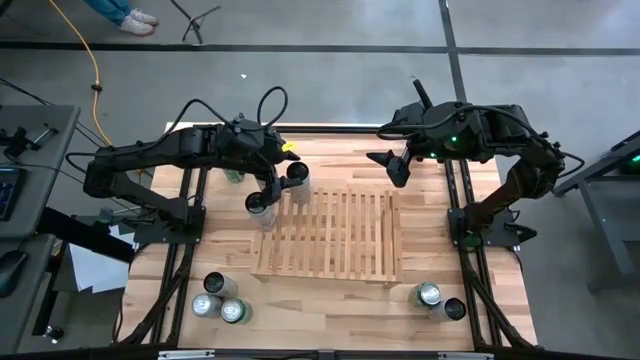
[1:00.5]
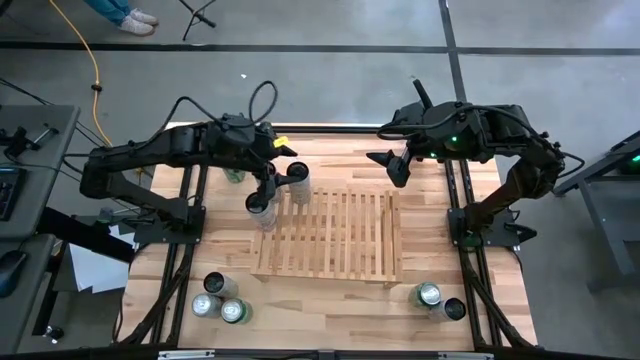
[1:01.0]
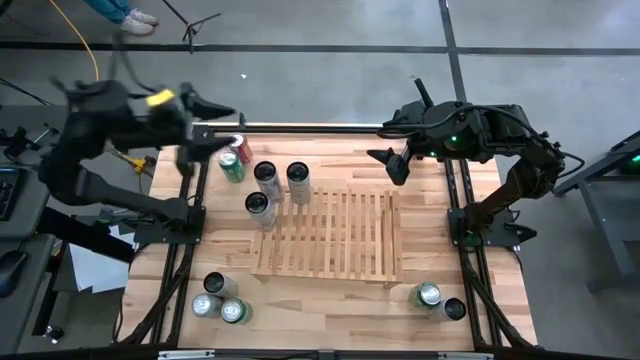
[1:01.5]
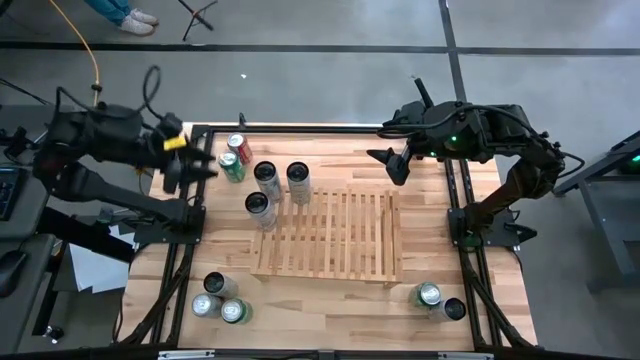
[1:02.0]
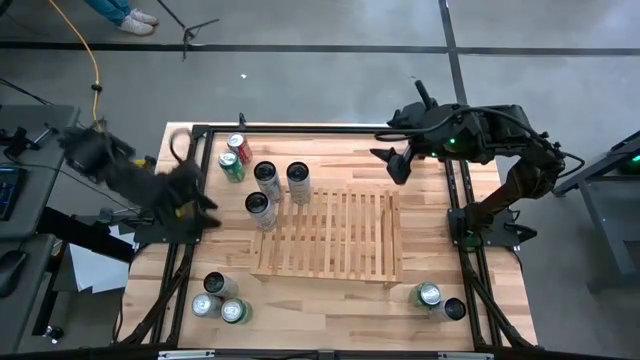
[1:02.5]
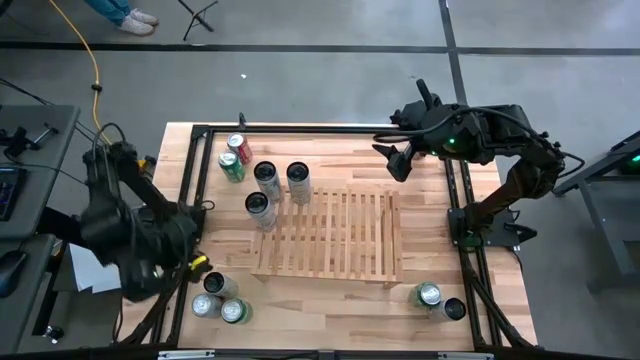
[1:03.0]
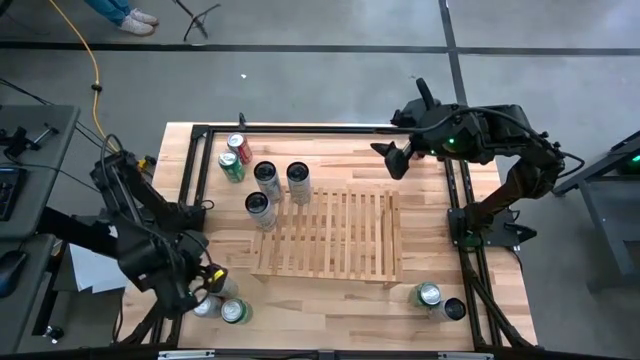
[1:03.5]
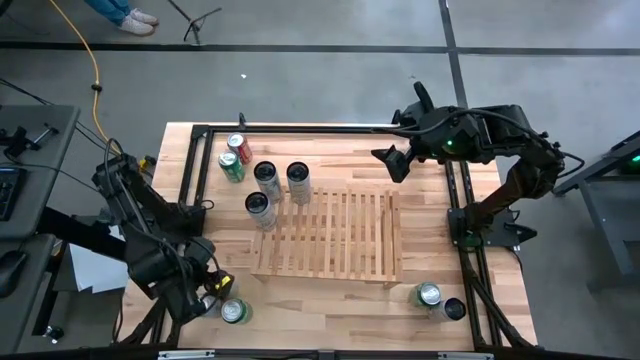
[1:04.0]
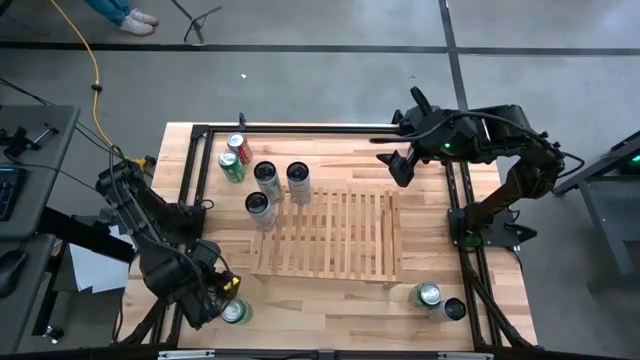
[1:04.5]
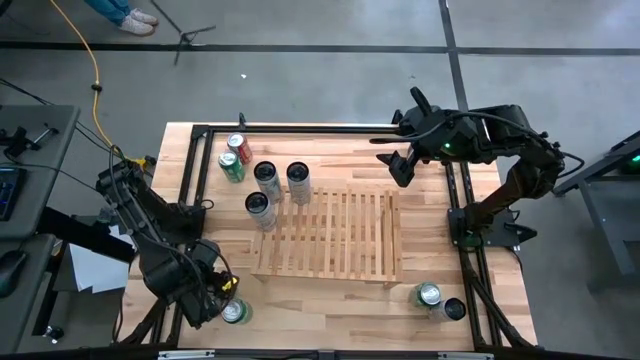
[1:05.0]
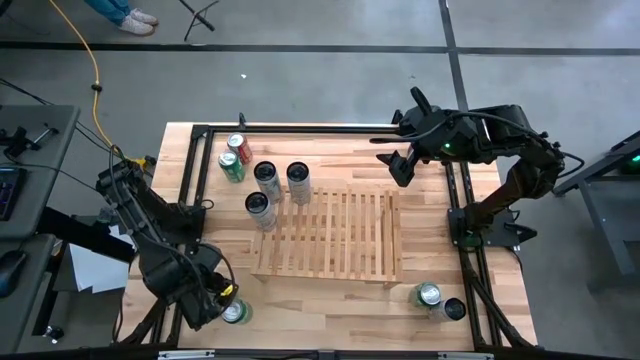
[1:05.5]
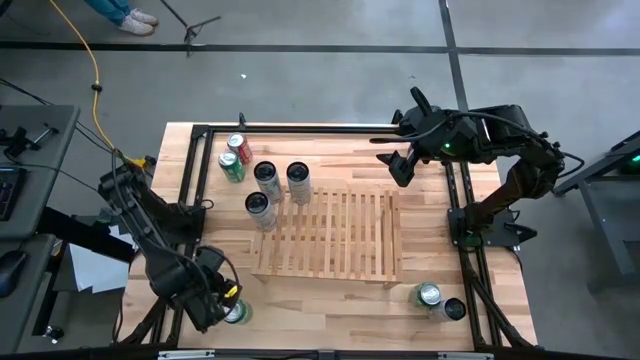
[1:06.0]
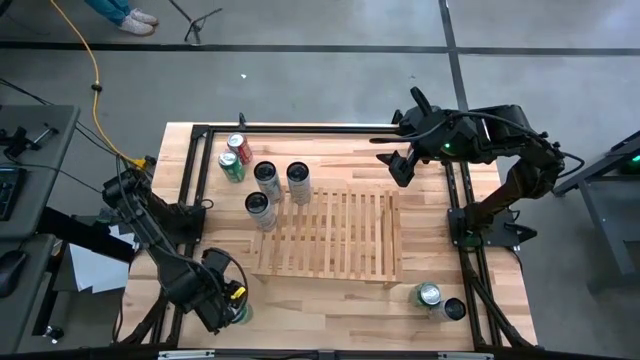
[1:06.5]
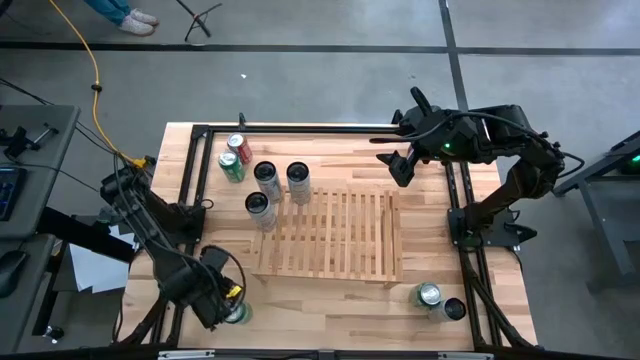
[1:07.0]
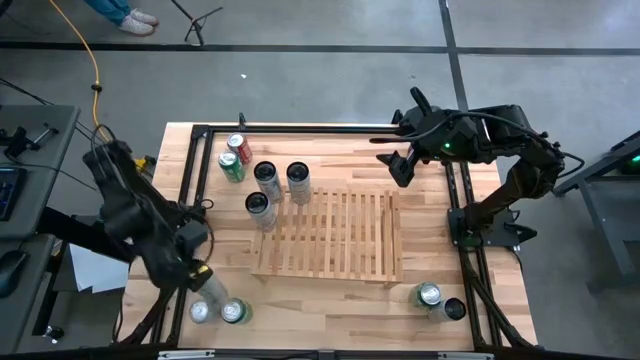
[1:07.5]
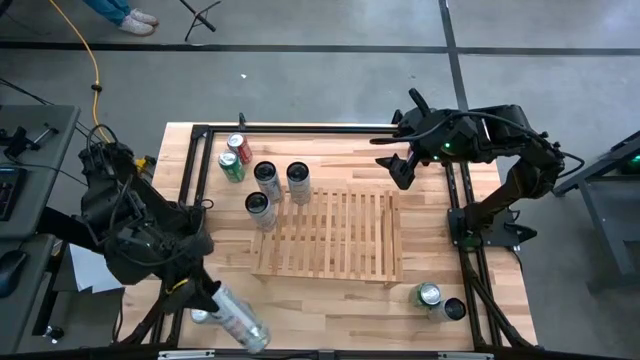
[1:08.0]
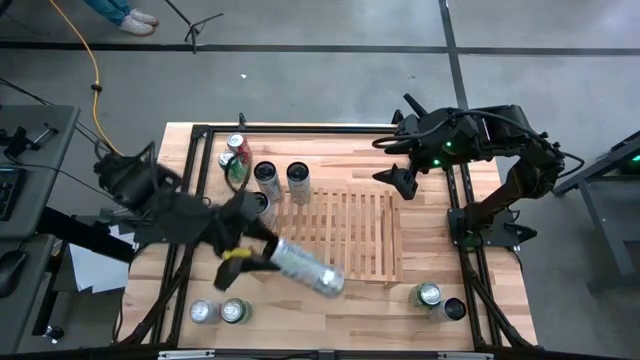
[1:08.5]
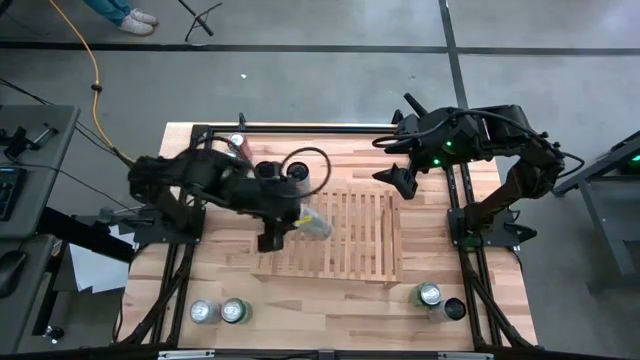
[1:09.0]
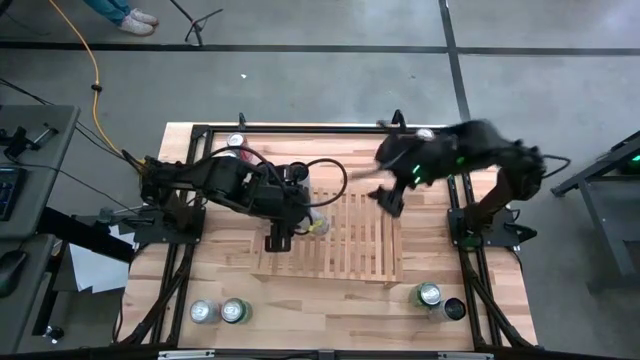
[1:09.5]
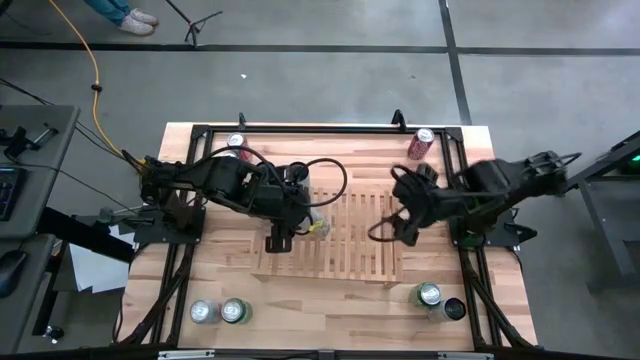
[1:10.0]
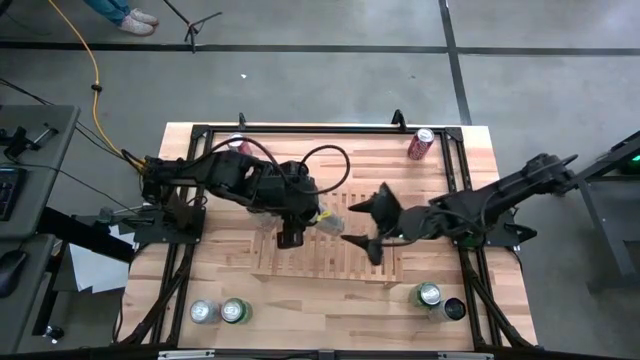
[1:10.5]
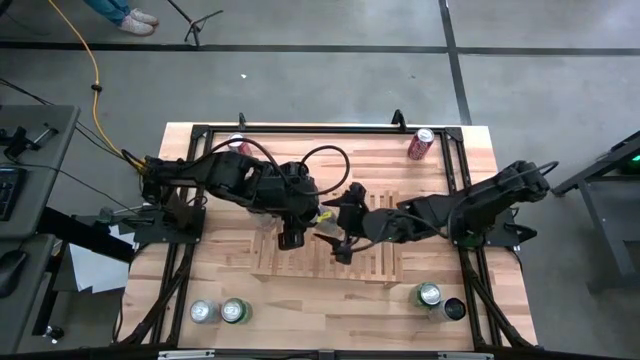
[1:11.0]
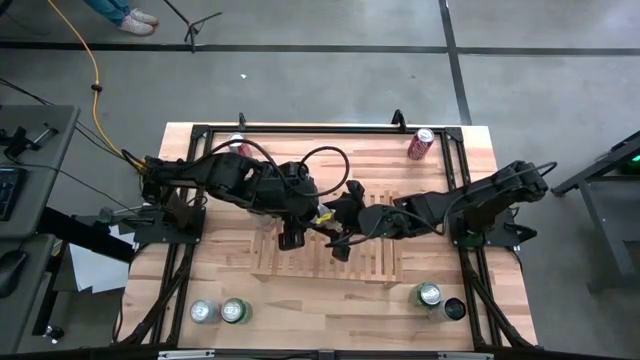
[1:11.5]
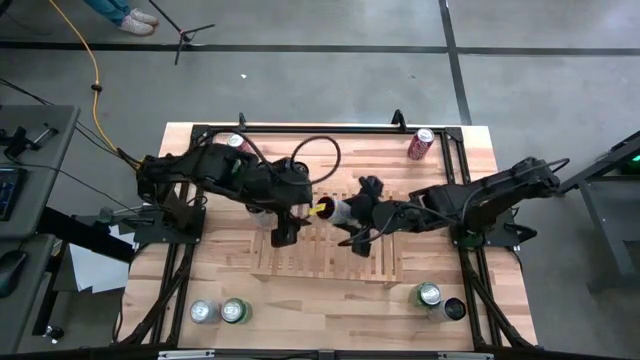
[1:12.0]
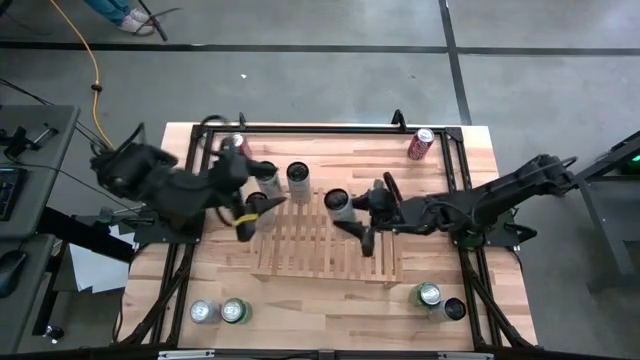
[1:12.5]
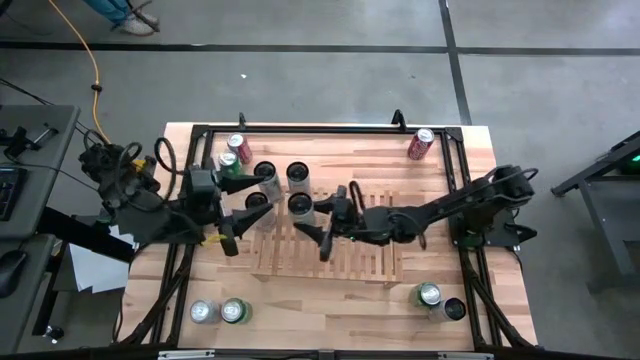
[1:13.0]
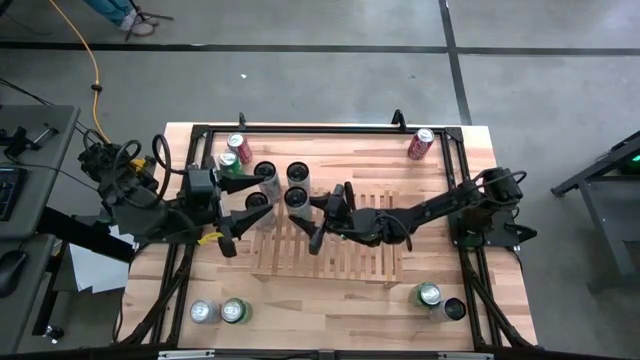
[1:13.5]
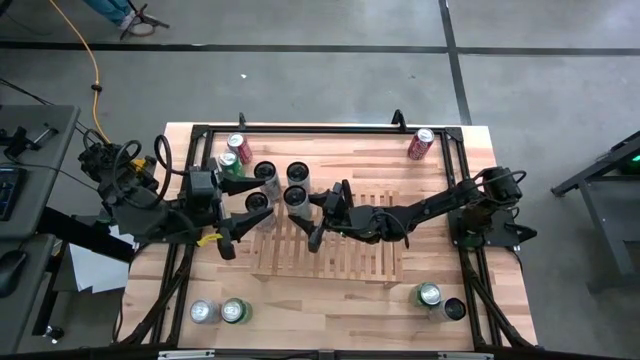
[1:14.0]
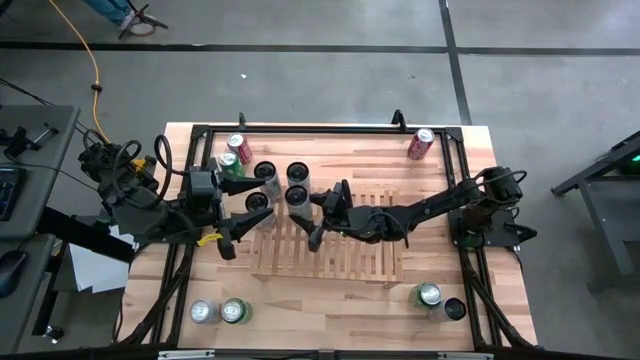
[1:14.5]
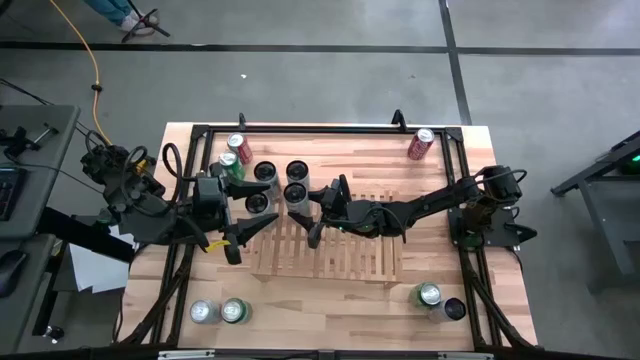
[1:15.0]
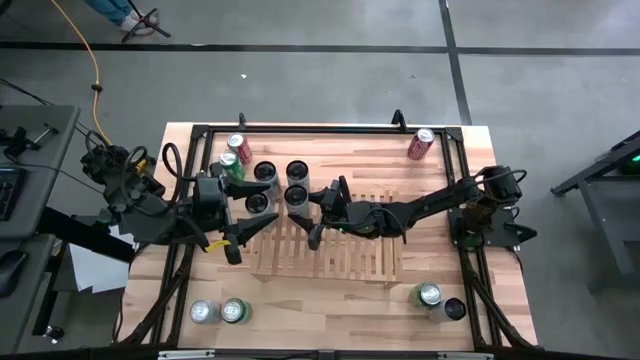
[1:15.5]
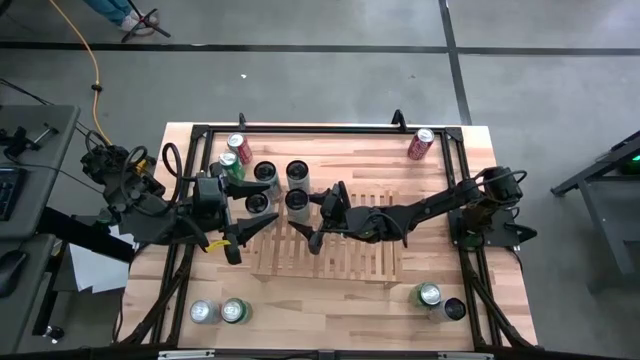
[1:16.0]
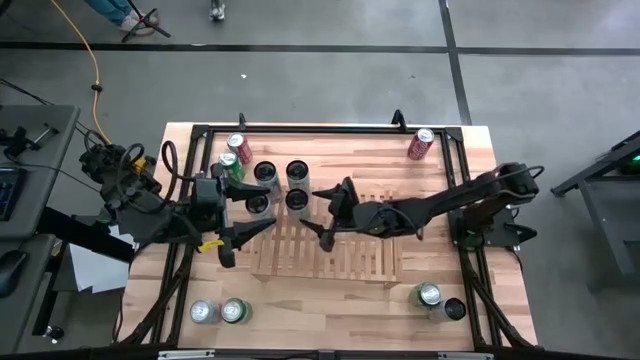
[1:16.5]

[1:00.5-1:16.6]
Task: Place canned beverage on shelf
Put the white yellow soda can aligned with other white yellow soda can on the shelf

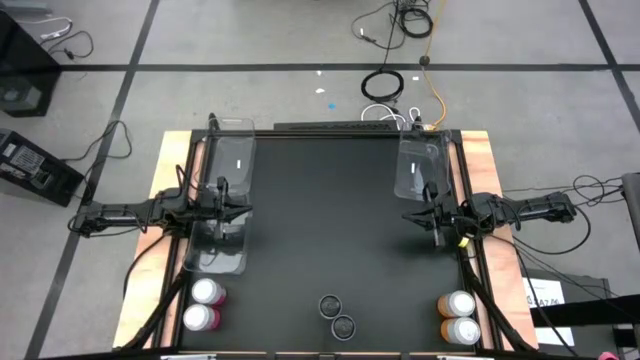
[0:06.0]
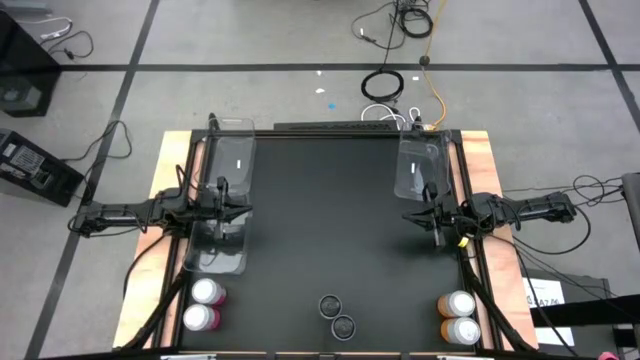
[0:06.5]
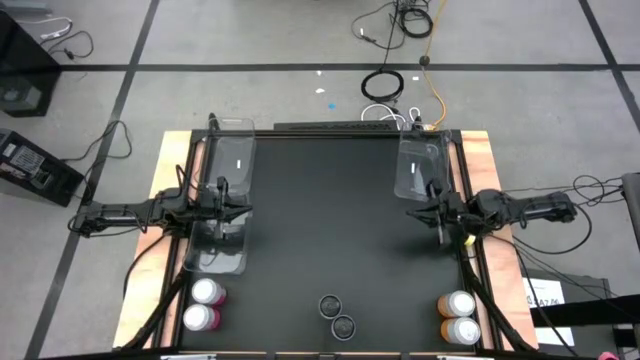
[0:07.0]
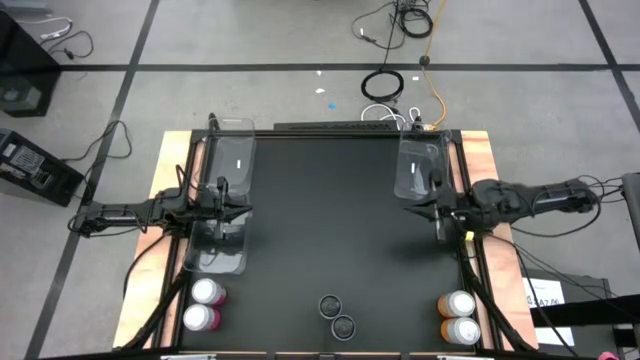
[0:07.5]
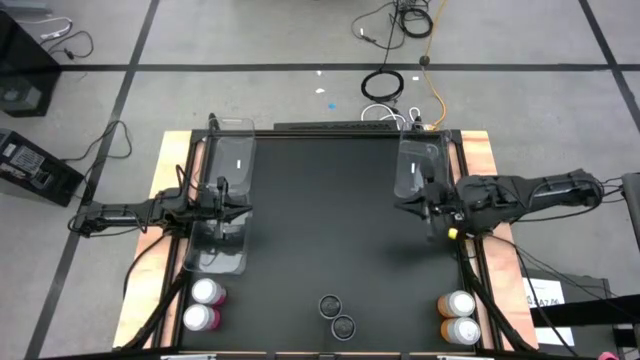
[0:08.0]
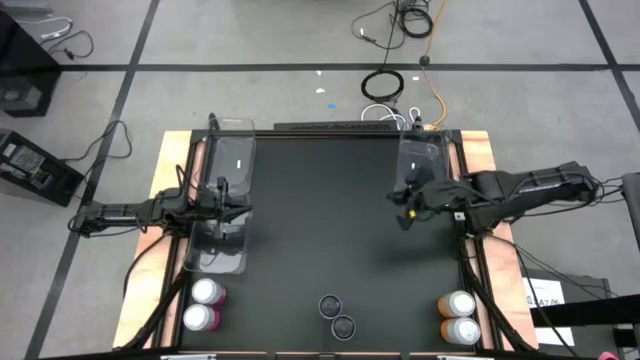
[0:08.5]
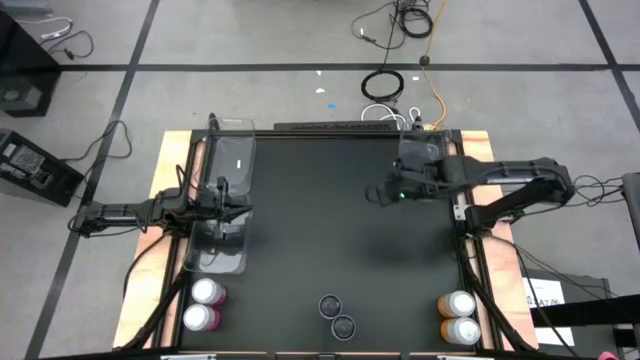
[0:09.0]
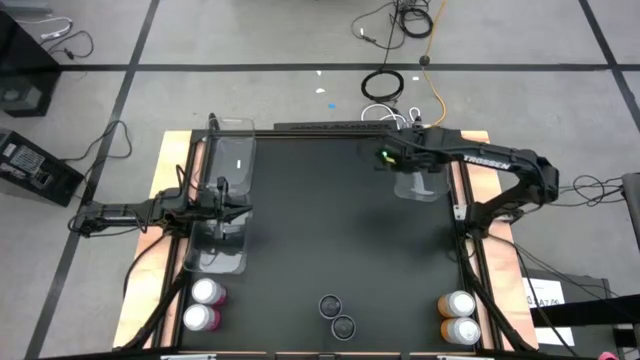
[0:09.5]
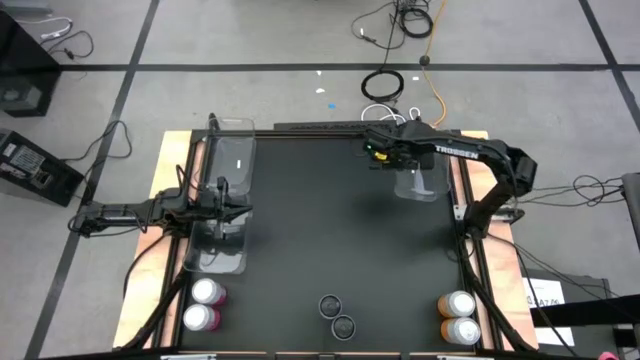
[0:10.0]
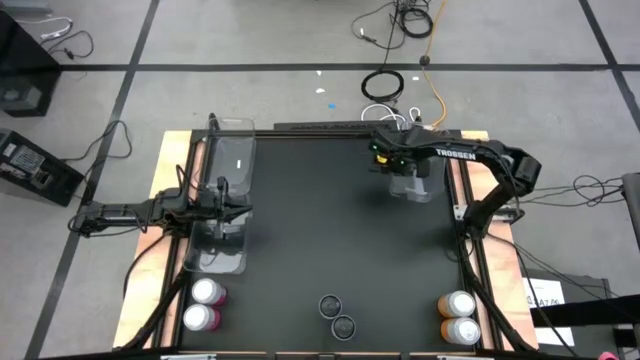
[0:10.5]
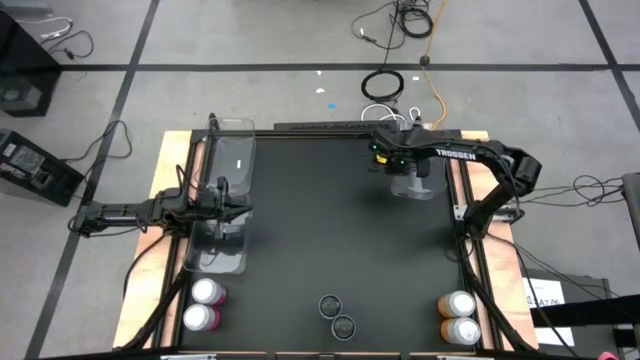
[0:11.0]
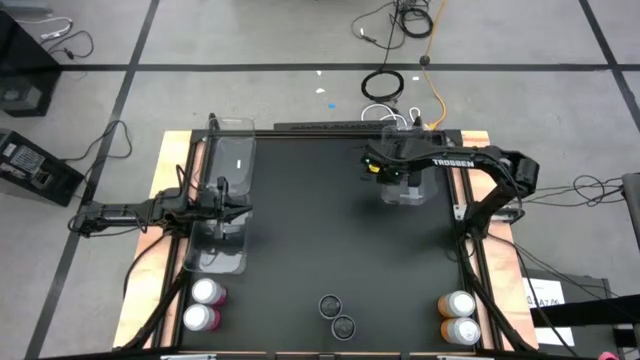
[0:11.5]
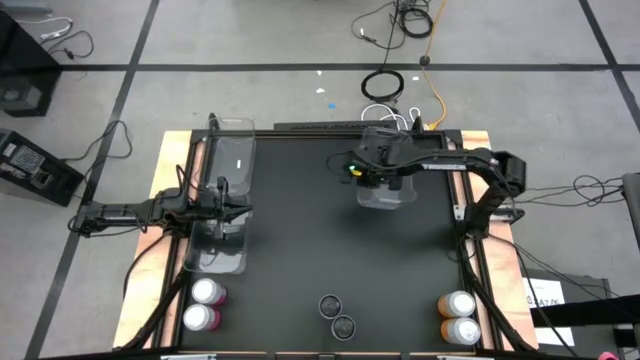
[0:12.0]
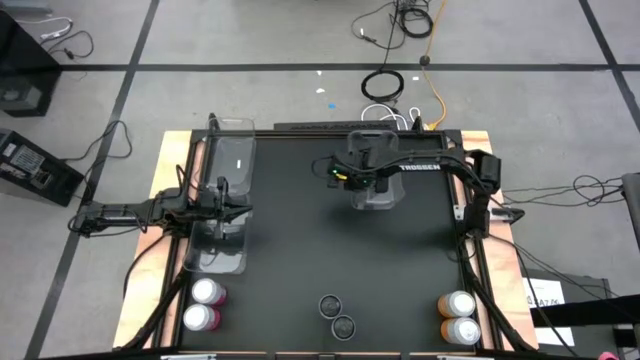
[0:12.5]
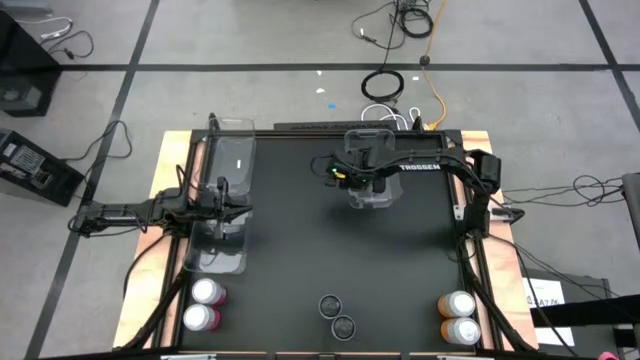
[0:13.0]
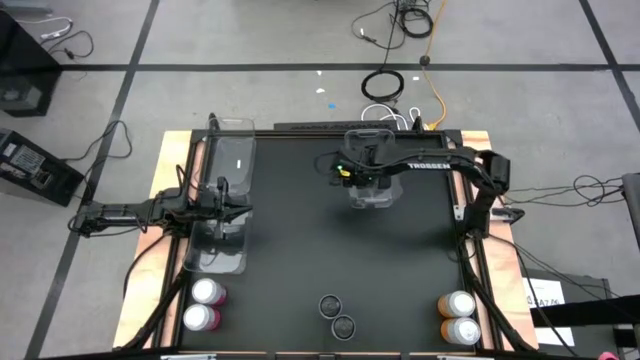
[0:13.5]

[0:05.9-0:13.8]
Task: Sort soda cans
Move the top right transparent bin to the top center of the table
